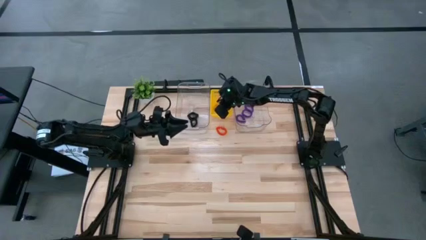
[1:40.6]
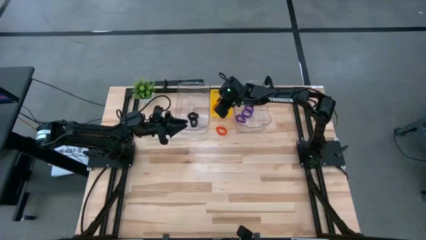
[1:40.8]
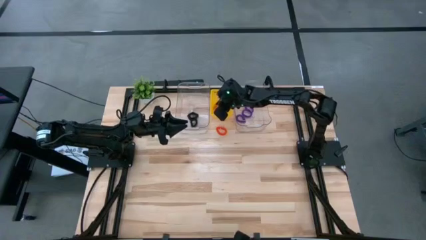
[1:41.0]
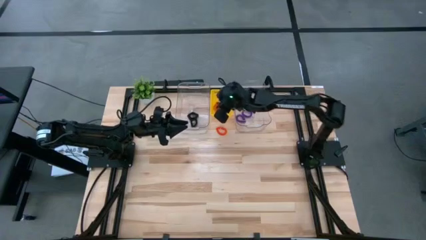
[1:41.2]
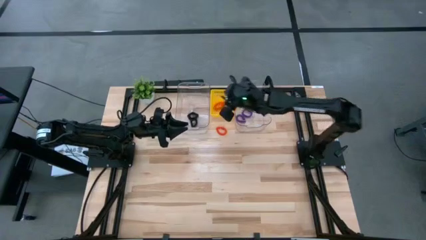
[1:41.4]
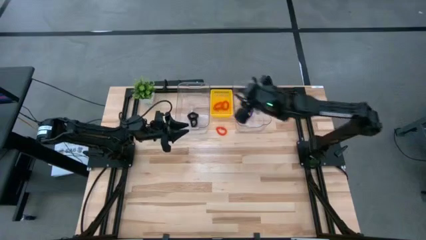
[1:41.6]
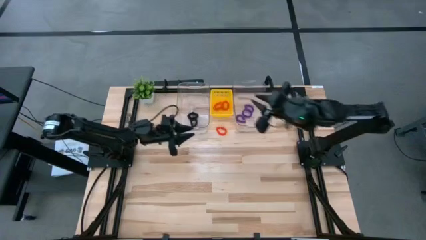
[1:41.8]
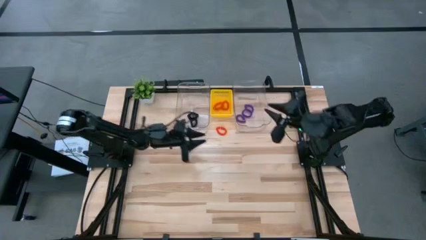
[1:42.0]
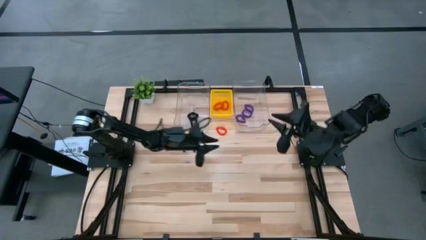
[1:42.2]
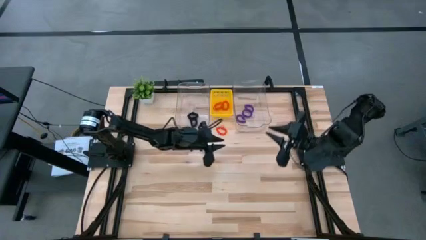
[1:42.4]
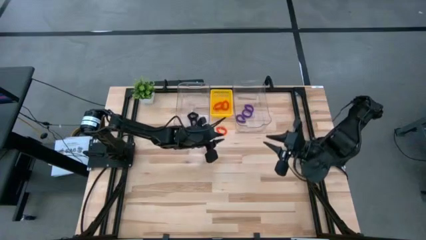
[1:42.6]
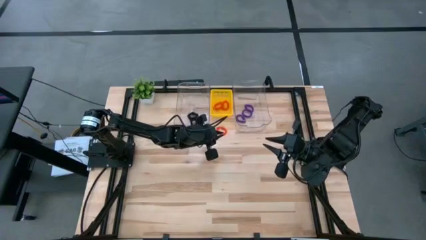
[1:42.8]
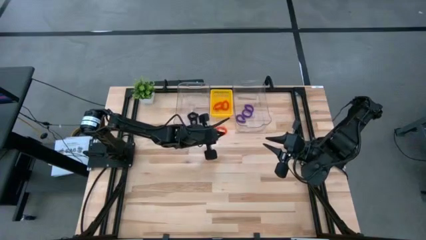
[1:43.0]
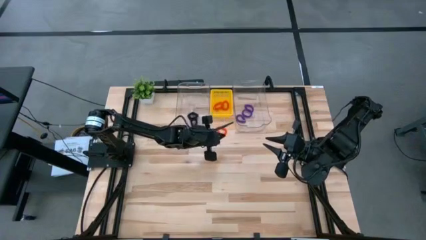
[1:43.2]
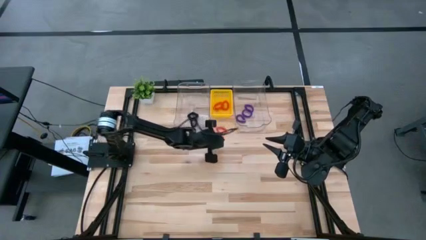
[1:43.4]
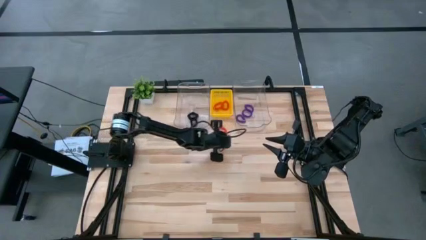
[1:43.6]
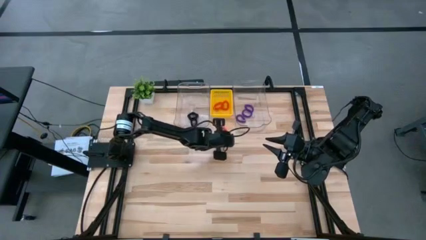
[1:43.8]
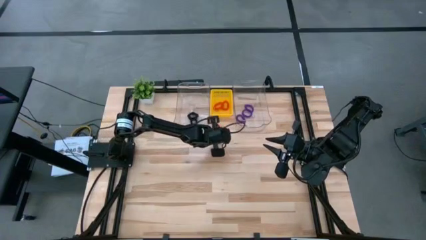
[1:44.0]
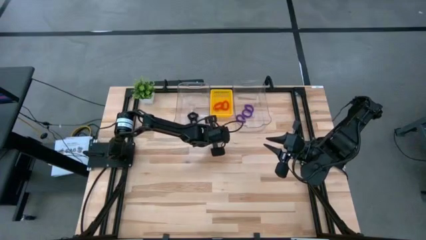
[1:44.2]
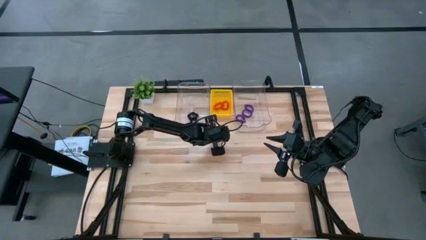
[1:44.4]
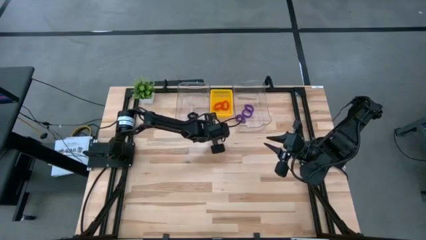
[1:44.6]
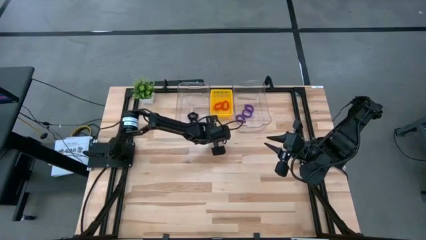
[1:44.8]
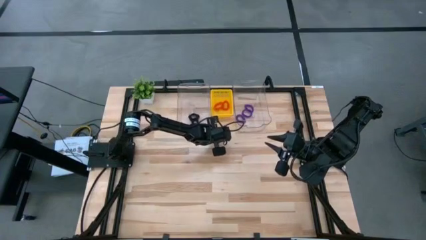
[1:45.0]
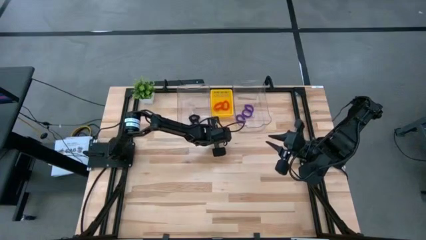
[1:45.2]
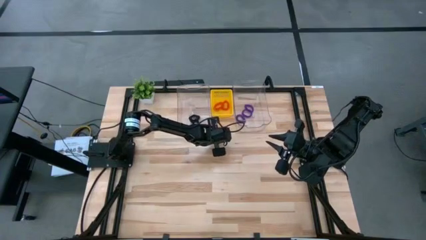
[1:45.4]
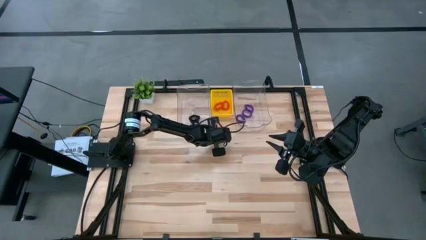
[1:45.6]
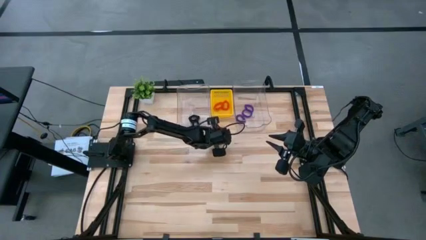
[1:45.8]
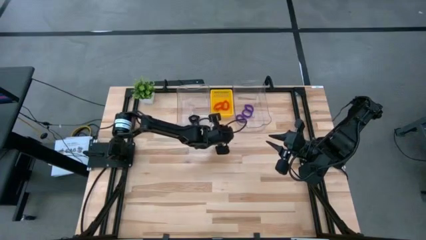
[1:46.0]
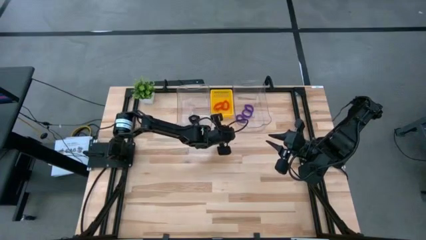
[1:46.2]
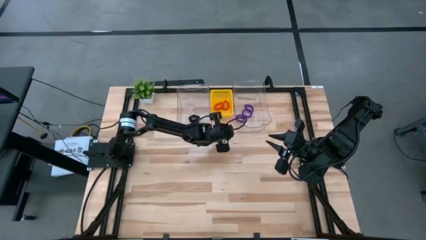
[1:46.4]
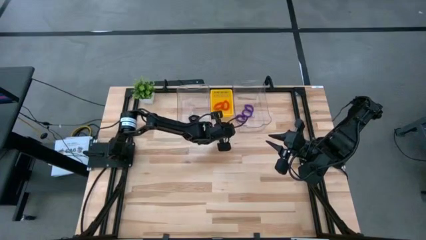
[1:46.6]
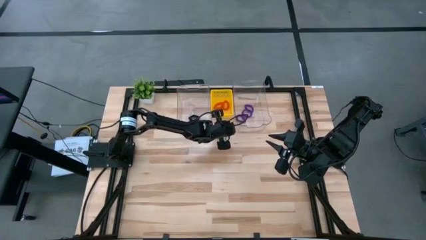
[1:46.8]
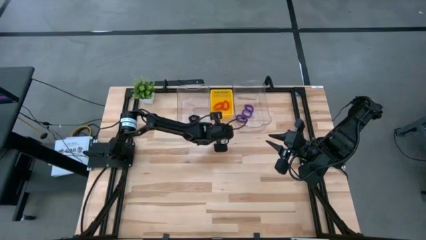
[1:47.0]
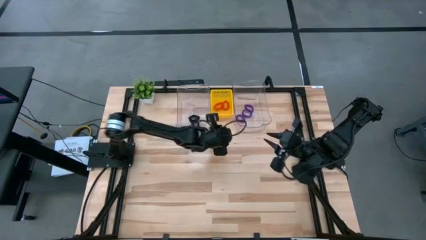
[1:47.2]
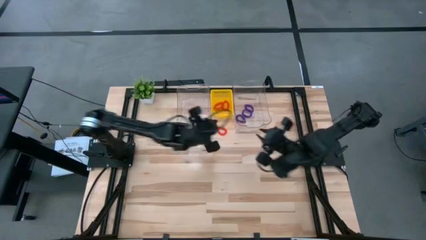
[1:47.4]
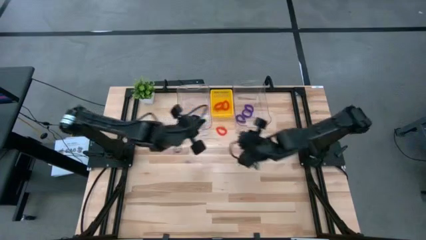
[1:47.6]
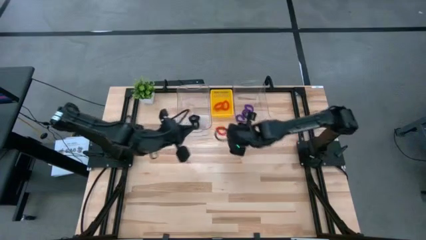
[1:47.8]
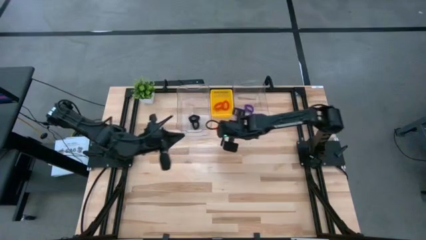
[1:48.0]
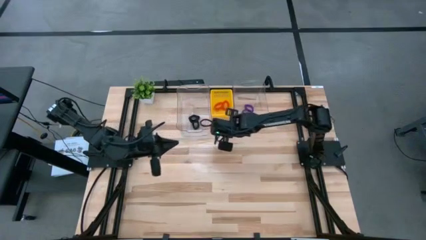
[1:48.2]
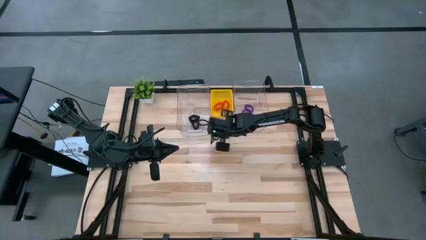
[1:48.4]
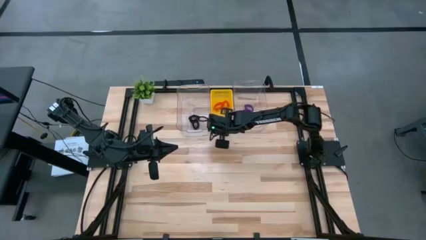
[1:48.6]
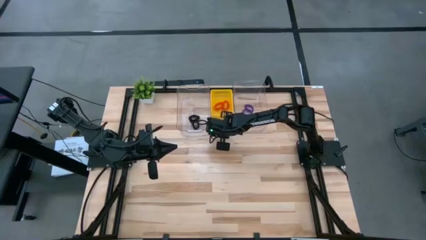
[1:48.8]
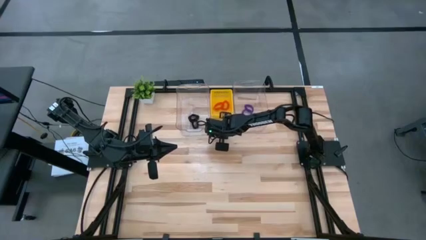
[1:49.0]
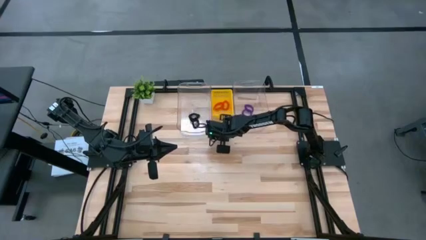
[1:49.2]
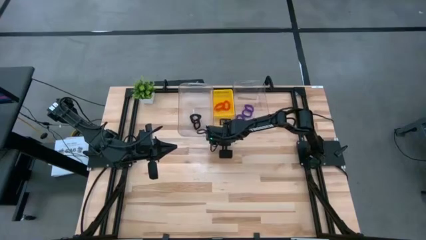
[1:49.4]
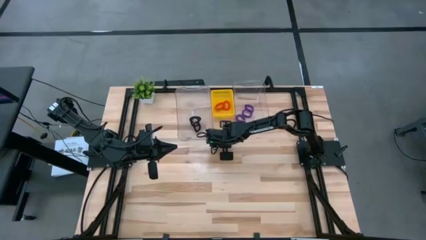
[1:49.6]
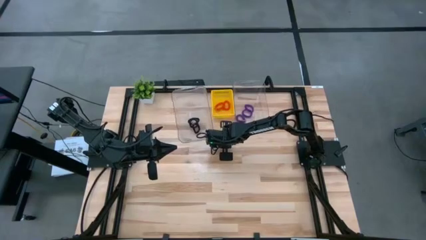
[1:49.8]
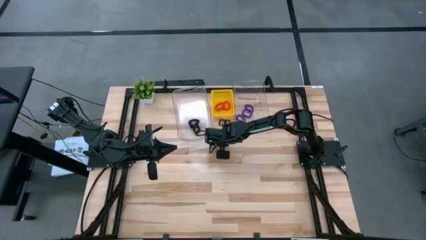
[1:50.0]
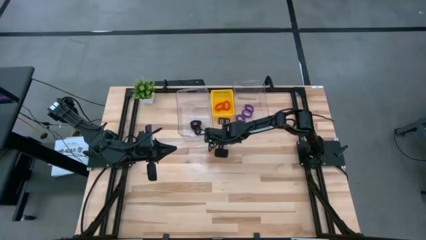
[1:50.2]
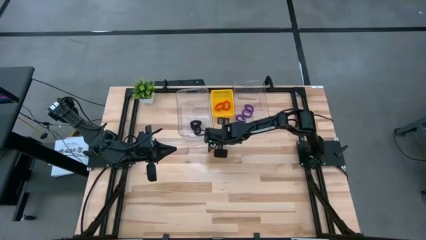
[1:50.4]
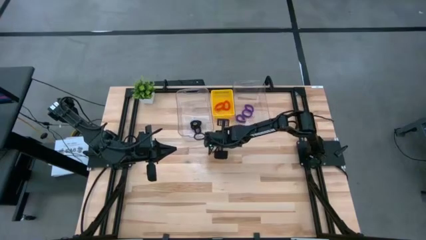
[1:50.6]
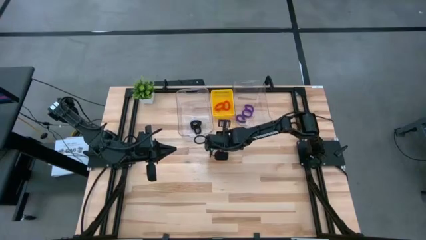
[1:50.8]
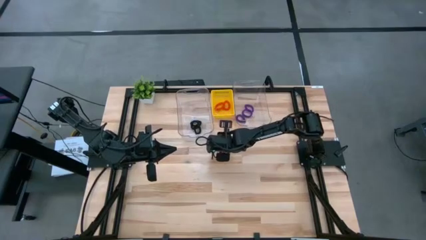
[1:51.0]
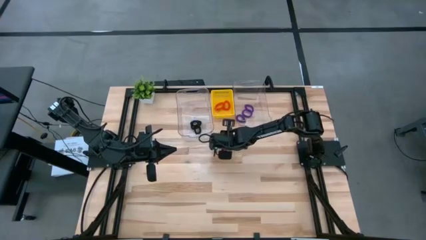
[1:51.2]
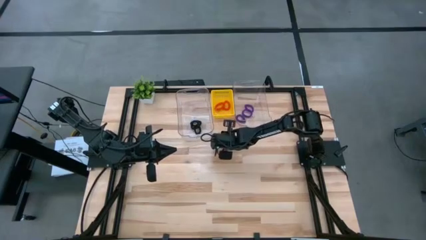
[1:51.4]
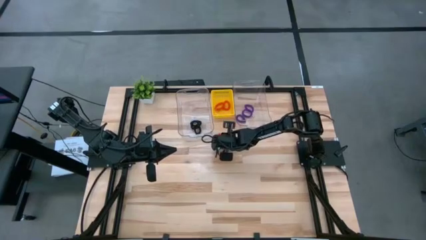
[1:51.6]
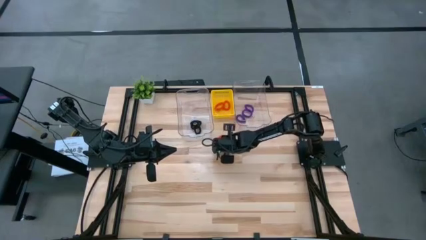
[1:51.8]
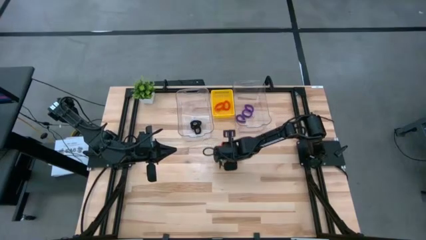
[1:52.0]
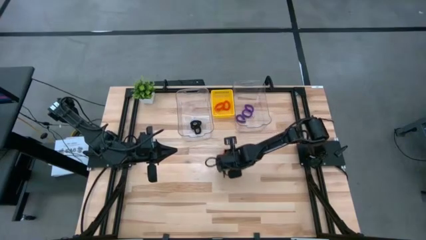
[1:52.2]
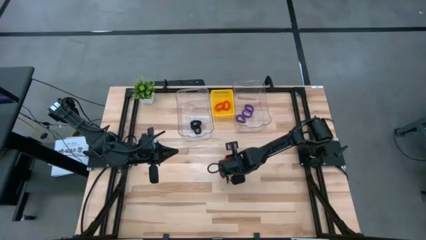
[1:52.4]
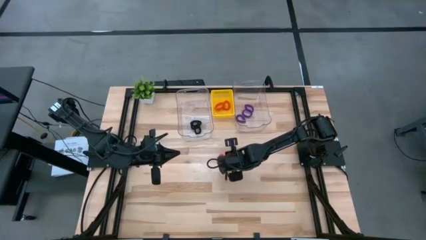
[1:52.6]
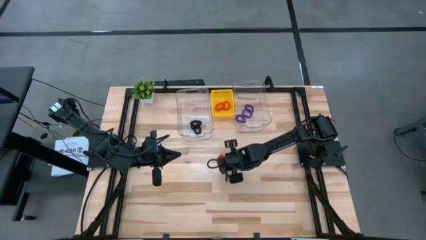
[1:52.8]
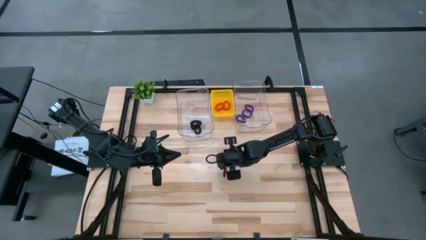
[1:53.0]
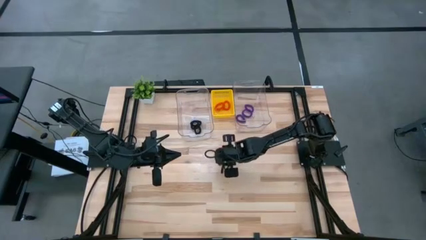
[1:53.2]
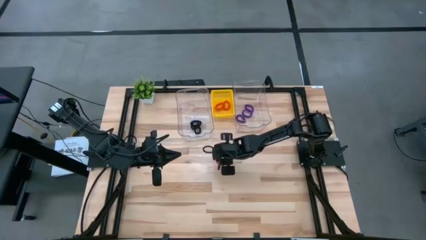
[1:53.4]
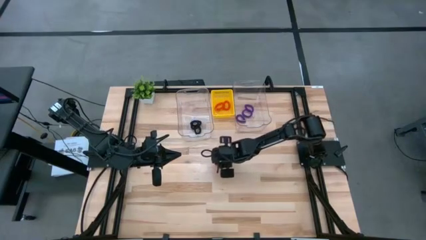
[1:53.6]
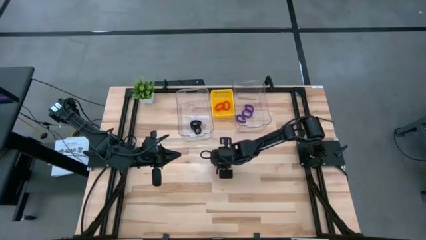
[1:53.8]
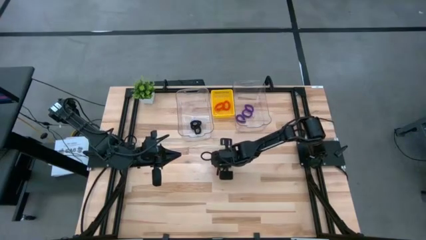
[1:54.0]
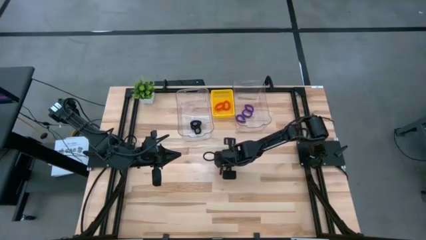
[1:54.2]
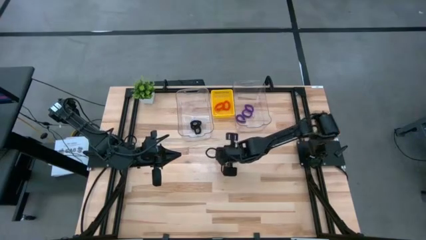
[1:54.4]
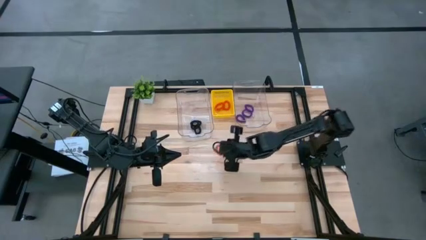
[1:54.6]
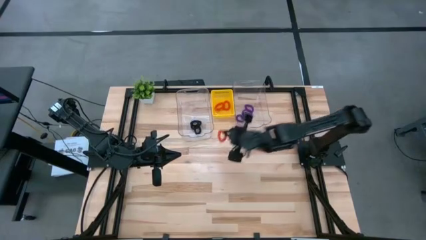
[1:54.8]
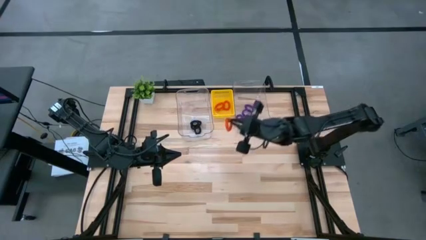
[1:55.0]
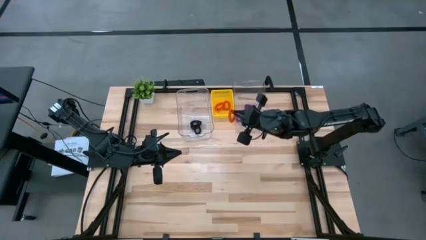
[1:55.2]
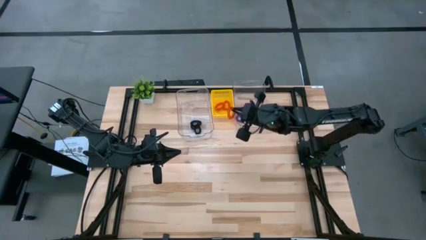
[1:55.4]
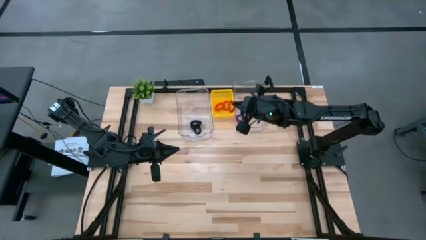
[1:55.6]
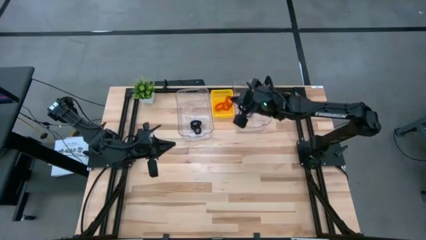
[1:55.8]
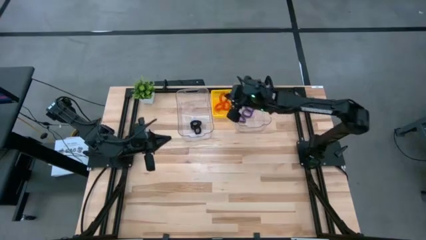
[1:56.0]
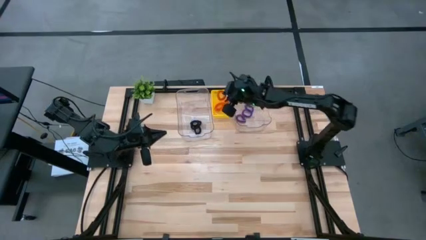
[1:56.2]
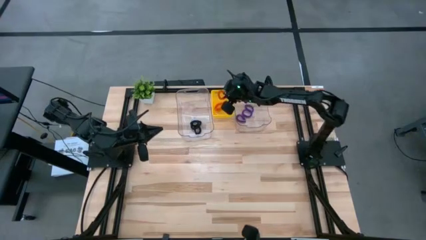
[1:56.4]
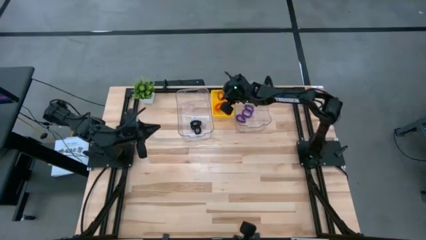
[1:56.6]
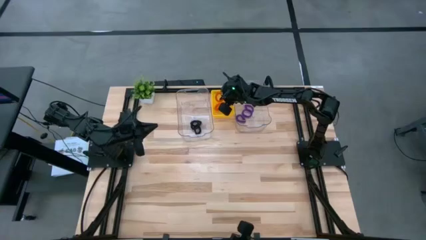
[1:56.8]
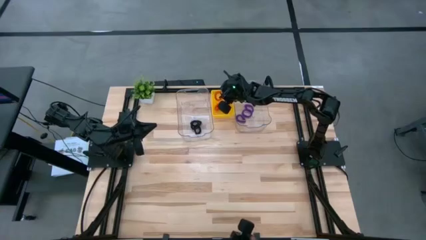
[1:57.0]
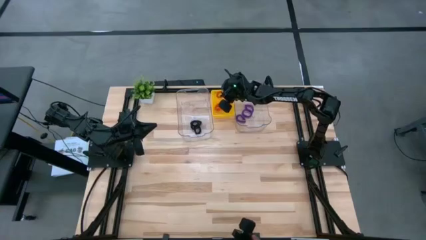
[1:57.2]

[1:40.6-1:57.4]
Task: Sort spring keychains
Put the orange spring keychain into the yellow bin
